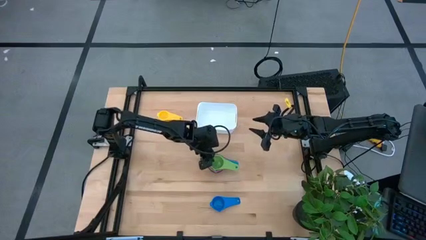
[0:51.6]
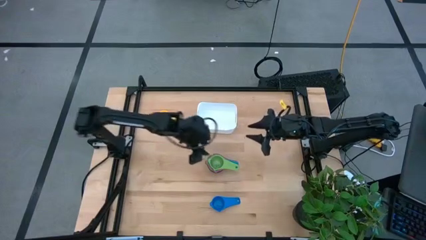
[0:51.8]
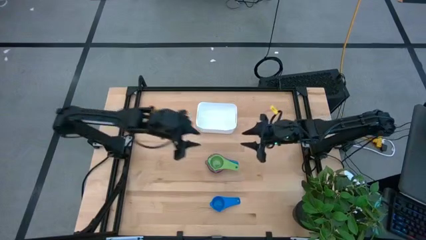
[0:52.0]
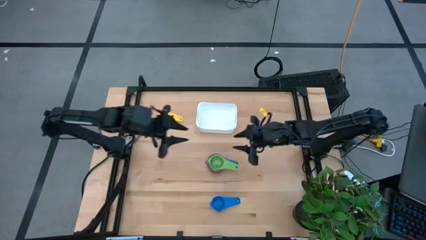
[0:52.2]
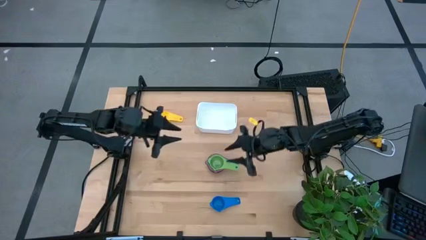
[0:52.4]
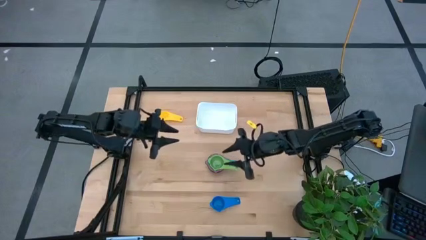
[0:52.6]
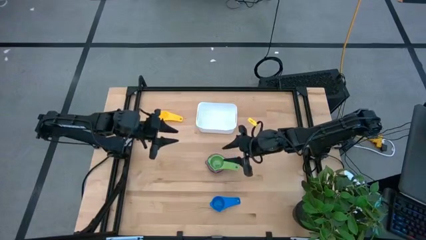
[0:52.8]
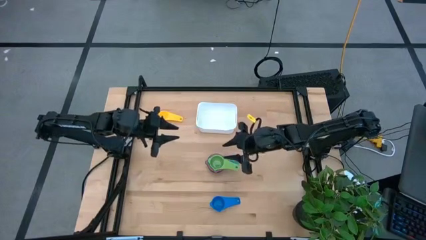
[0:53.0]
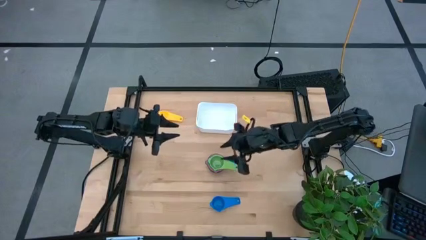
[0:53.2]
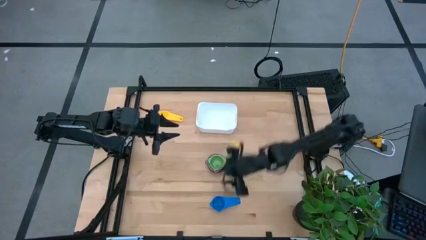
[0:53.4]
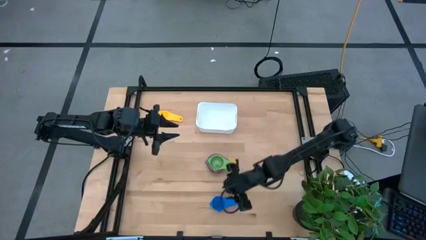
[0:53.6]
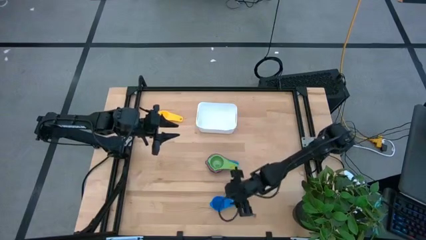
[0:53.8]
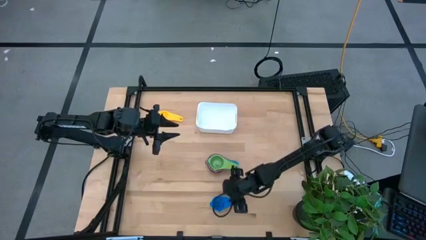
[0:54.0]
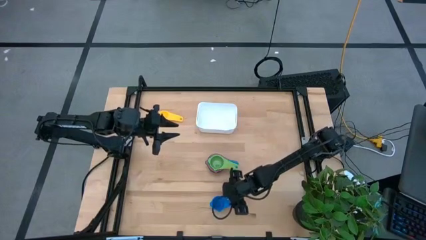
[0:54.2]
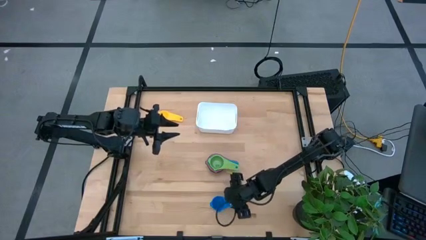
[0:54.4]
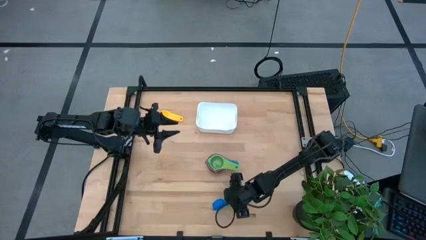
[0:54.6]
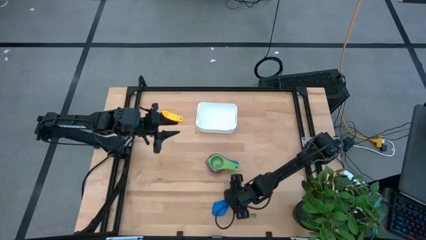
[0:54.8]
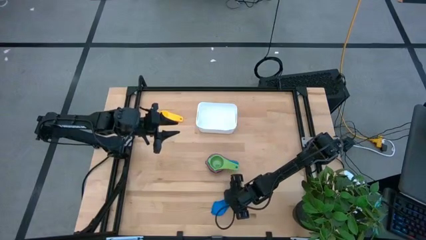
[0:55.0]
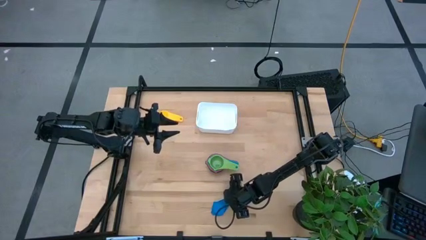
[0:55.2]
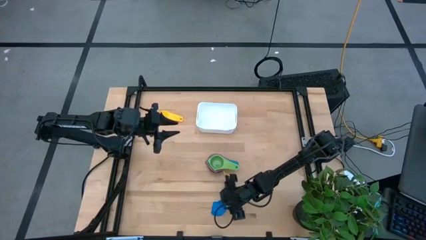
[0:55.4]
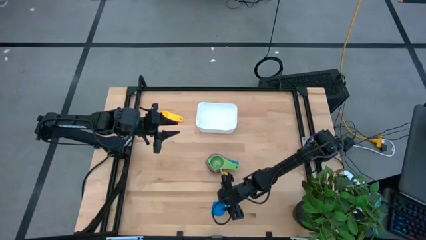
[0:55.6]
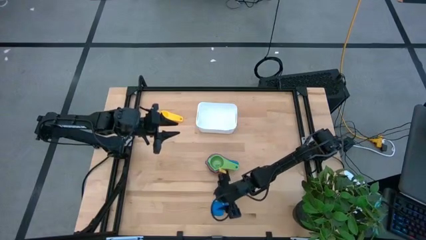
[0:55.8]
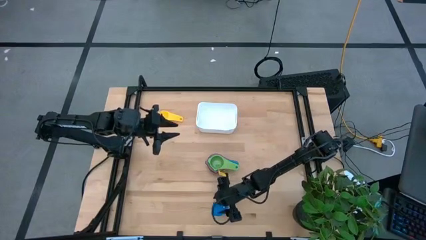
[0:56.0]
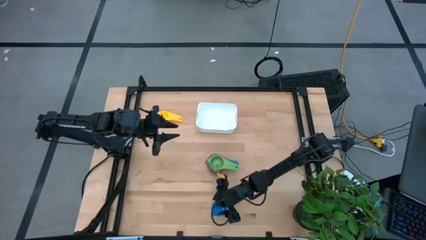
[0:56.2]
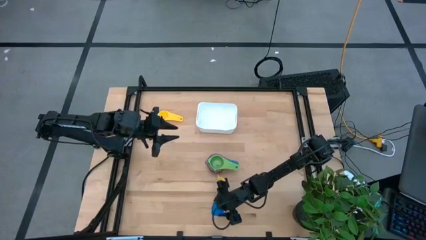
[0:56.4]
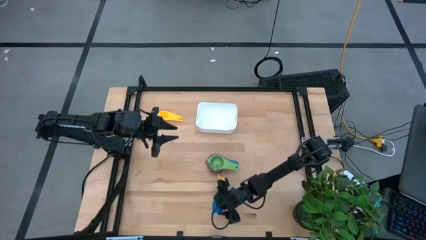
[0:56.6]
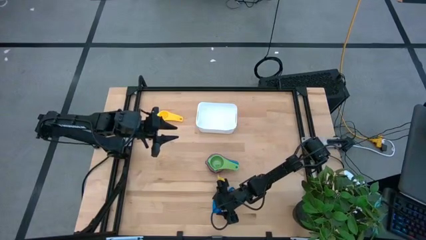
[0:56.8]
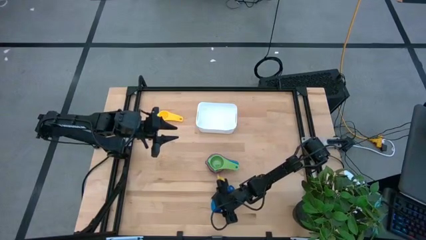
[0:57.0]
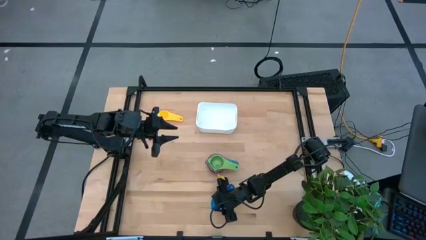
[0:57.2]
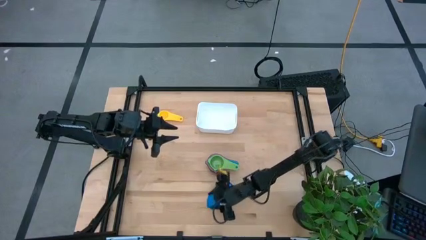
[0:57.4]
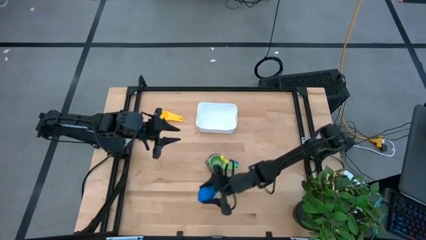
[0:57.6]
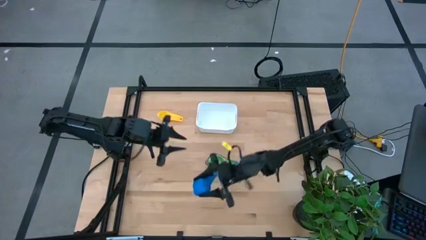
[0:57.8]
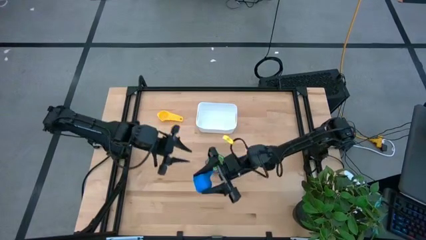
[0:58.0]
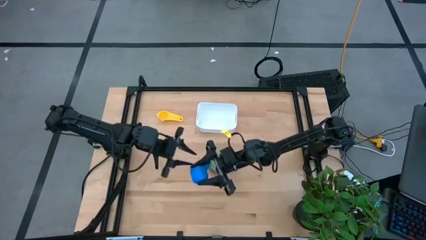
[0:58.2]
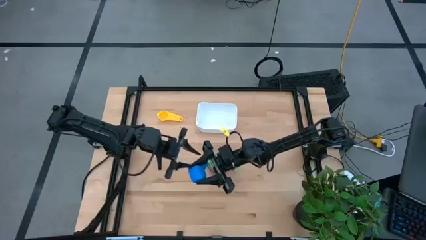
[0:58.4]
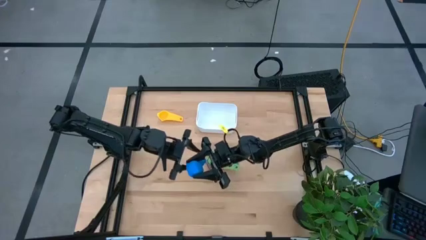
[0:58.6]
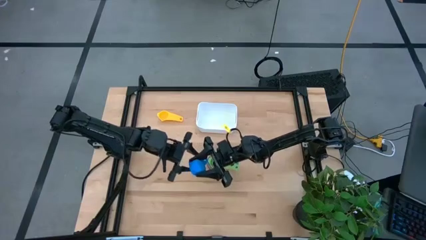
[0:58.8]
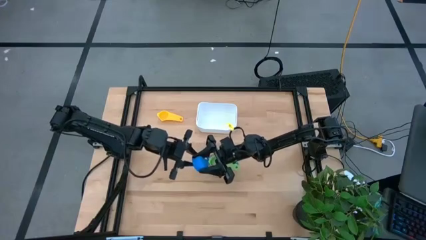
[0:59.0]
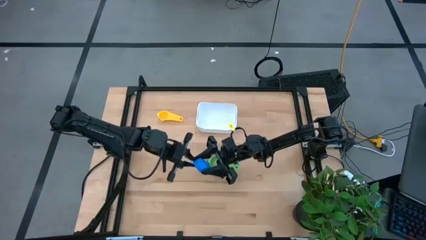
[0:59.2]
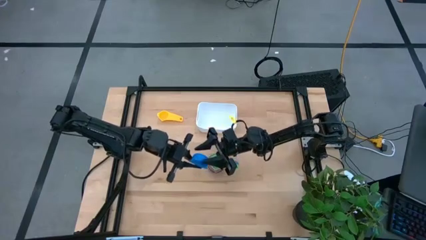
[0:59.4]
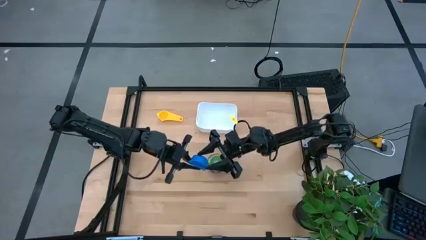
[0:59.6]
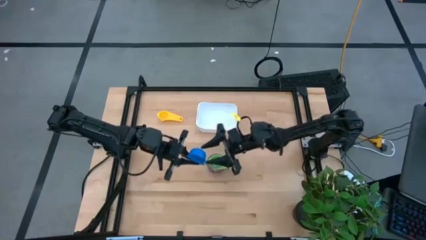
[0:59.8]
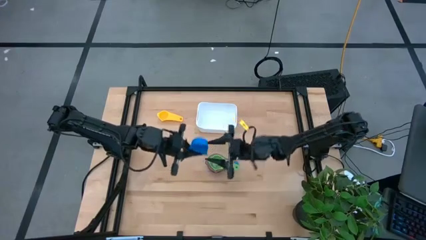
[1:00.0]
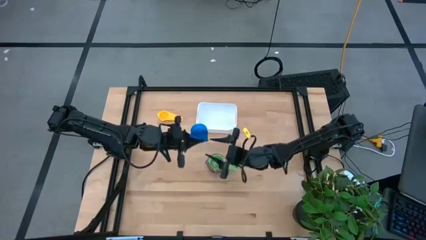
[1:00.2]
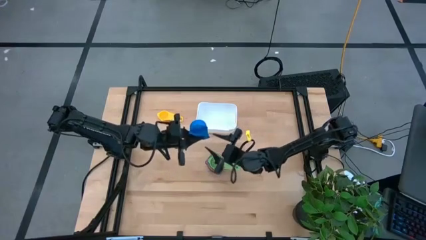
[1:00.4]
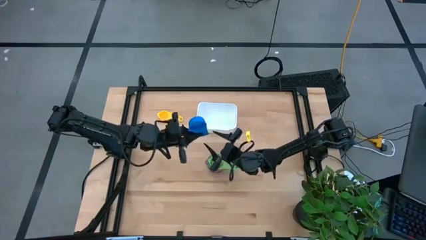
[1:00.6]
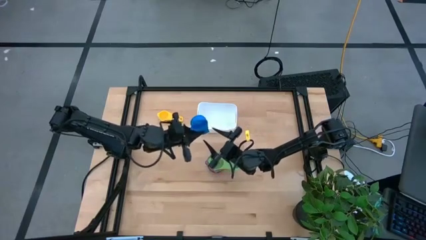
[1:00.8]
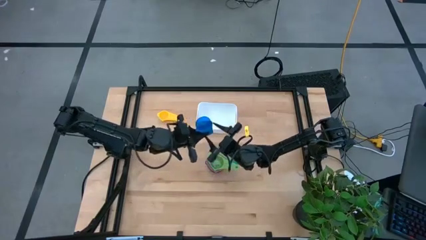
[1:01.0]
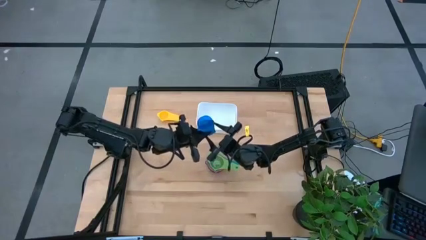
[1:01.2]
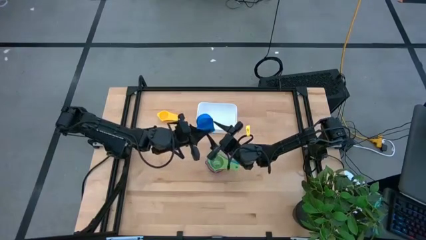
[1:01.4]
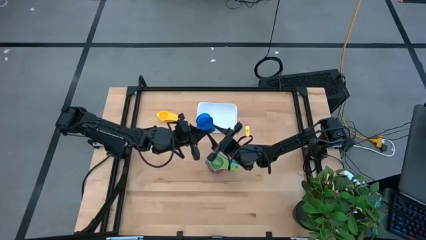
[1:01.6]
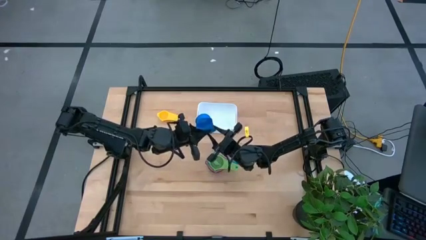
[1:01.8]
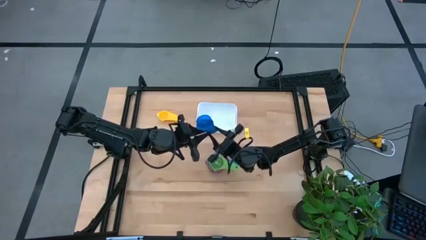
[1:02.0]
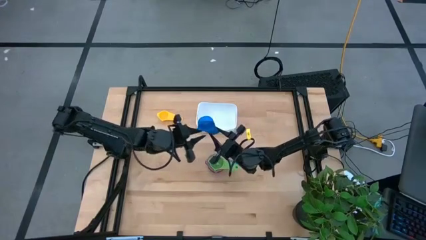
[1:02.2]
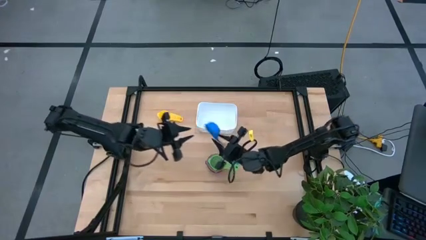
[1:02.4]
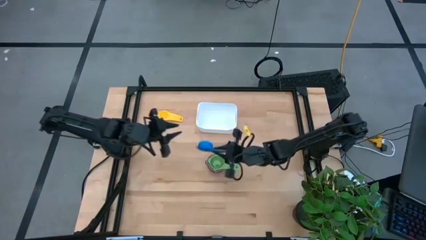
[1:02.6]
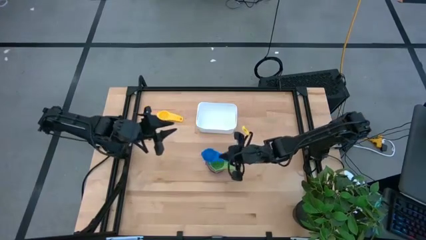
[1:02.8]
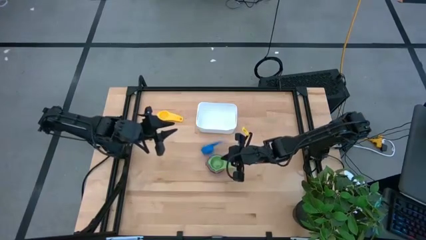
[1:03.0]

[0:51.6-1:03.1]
Task: Nest measuring cups in basket
Stack the dark blue measuring cup on top of the green measuring cup
